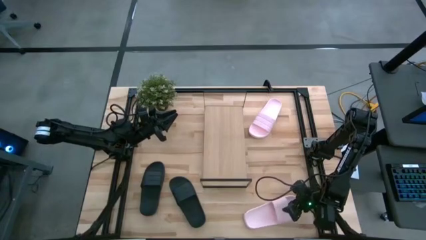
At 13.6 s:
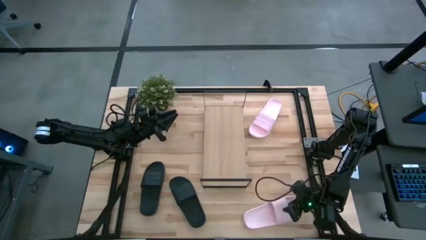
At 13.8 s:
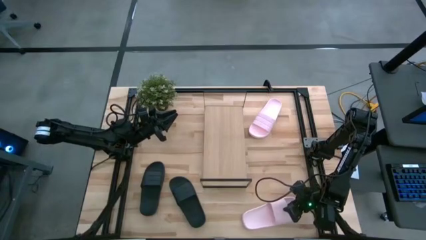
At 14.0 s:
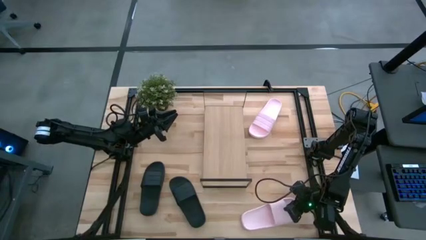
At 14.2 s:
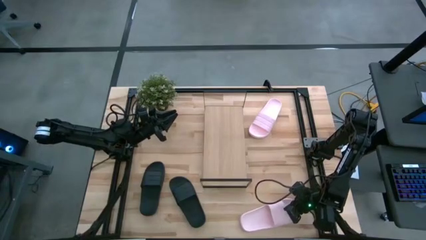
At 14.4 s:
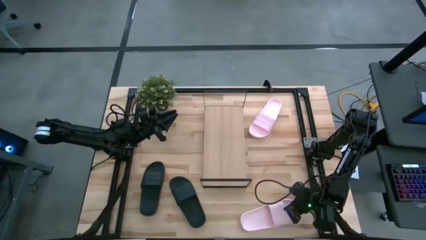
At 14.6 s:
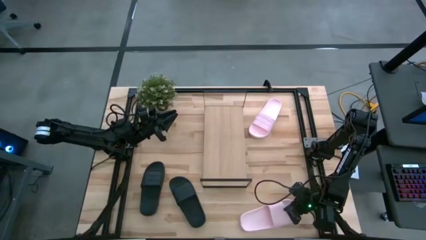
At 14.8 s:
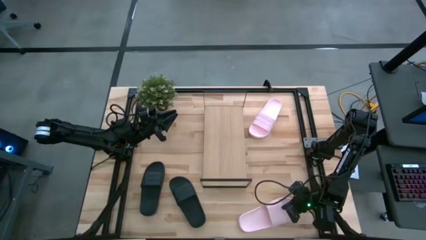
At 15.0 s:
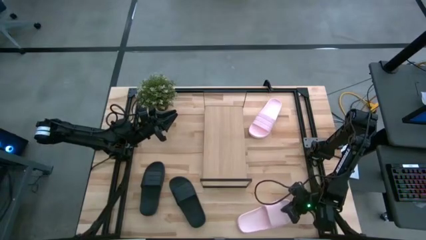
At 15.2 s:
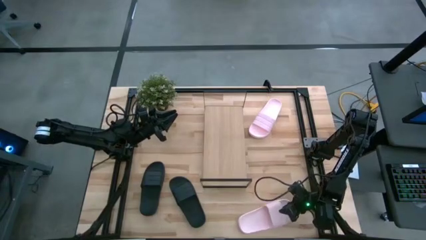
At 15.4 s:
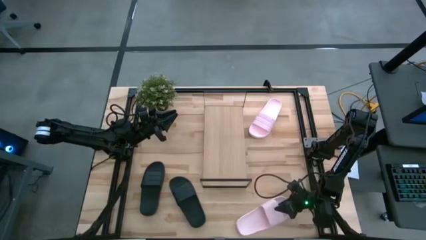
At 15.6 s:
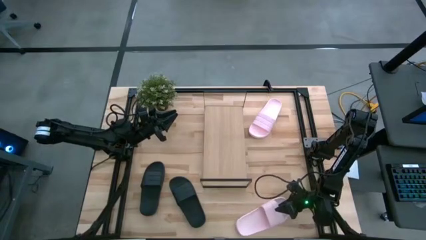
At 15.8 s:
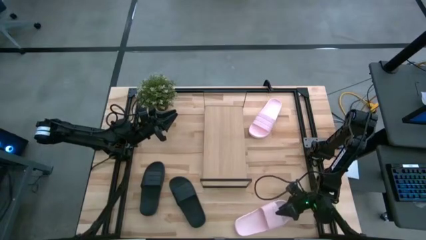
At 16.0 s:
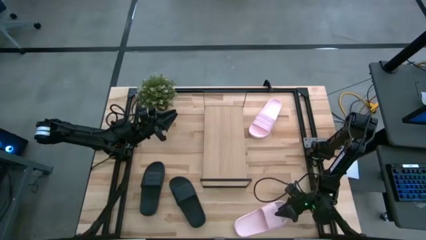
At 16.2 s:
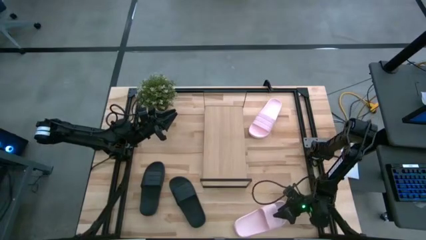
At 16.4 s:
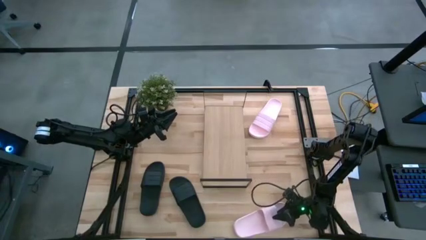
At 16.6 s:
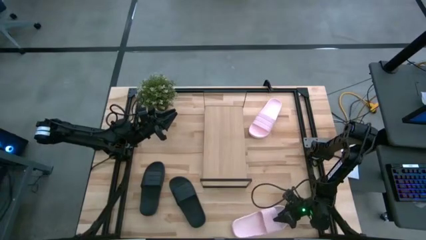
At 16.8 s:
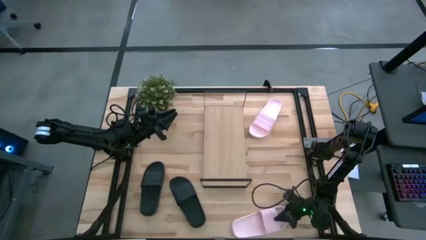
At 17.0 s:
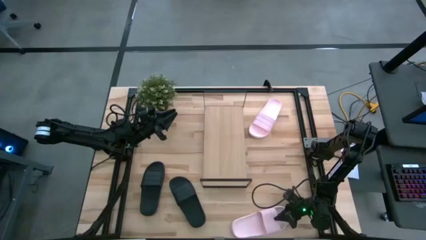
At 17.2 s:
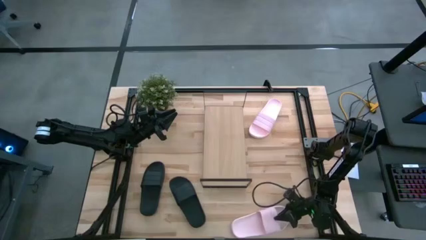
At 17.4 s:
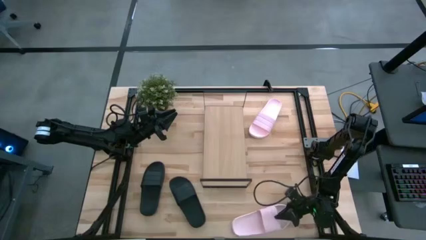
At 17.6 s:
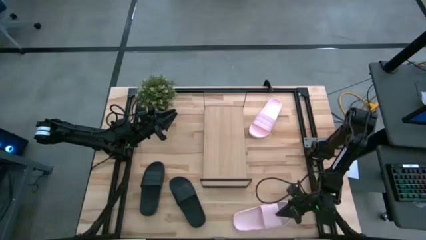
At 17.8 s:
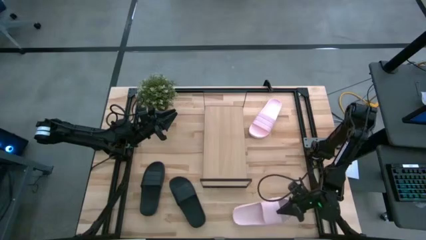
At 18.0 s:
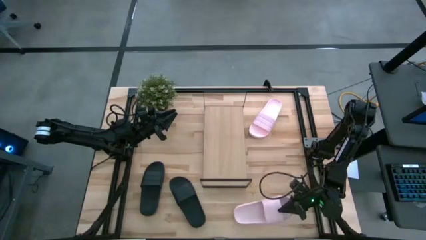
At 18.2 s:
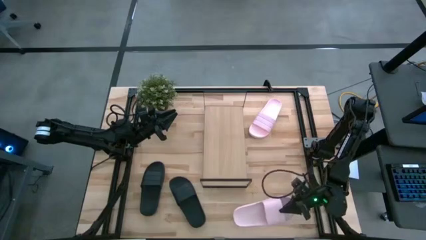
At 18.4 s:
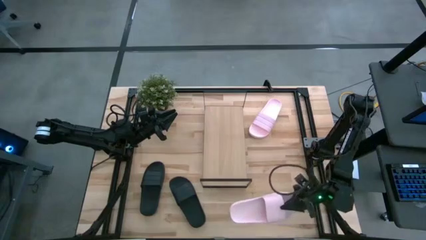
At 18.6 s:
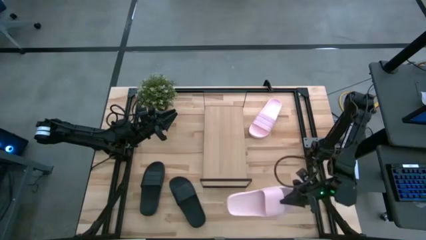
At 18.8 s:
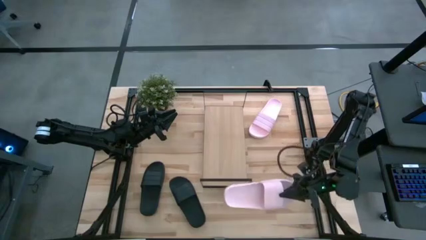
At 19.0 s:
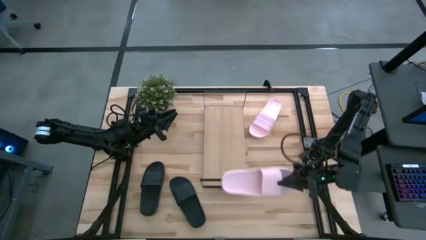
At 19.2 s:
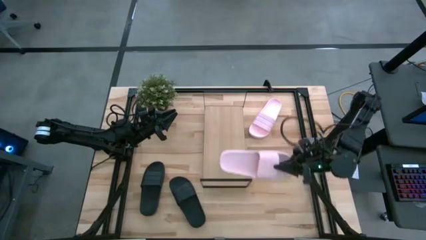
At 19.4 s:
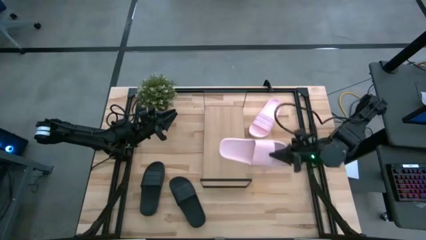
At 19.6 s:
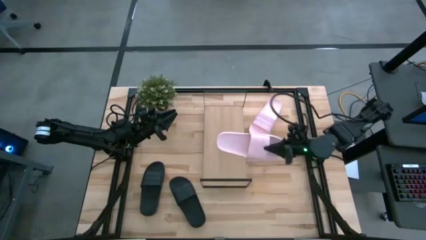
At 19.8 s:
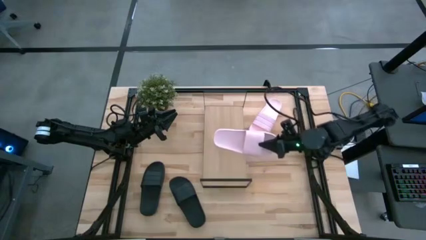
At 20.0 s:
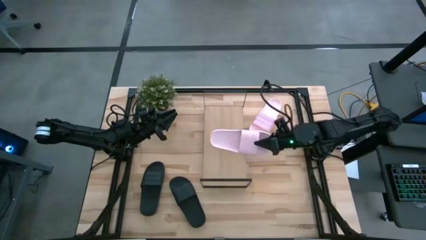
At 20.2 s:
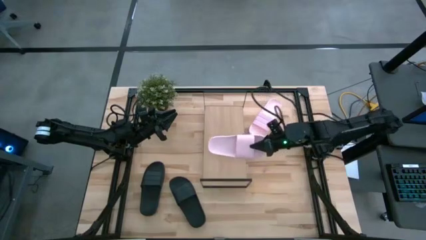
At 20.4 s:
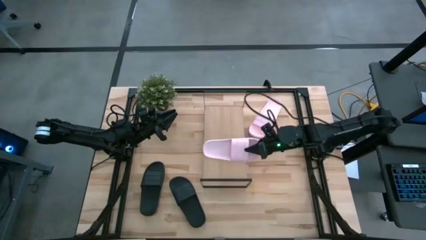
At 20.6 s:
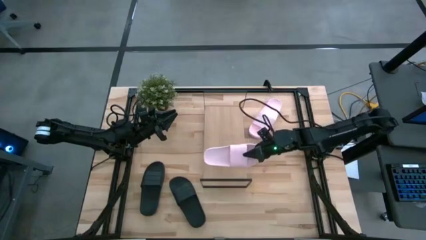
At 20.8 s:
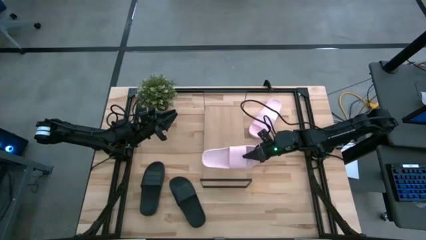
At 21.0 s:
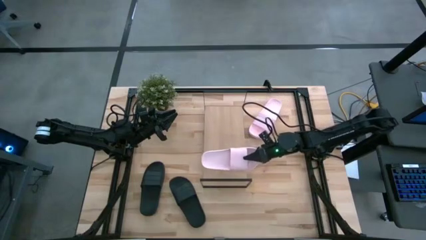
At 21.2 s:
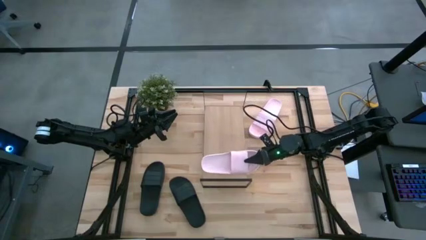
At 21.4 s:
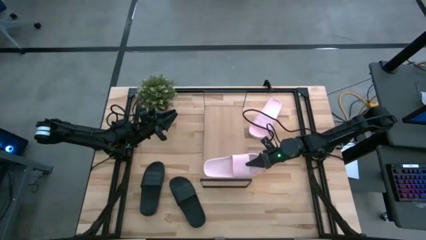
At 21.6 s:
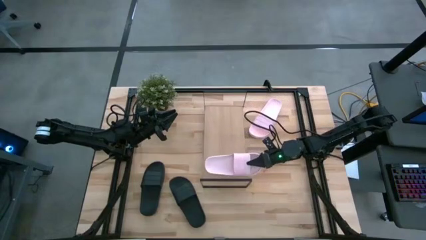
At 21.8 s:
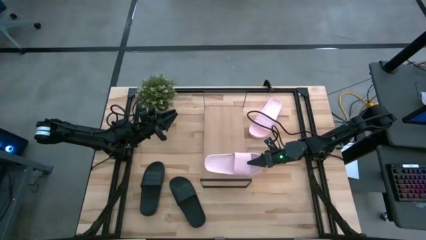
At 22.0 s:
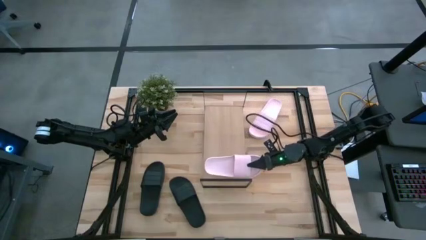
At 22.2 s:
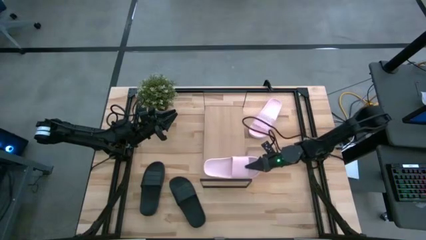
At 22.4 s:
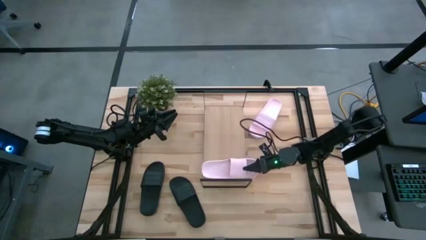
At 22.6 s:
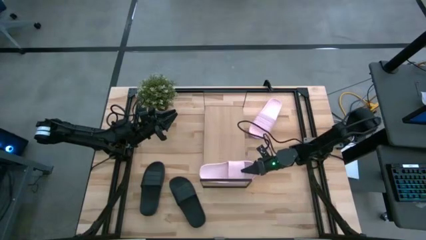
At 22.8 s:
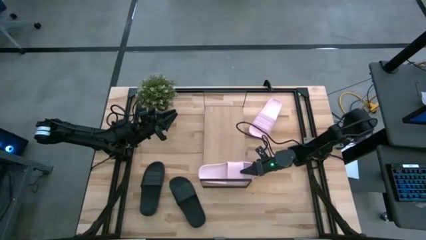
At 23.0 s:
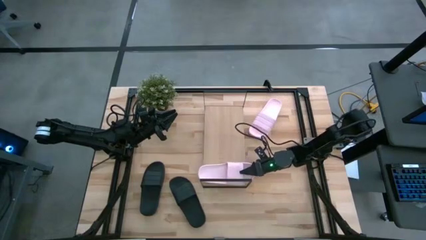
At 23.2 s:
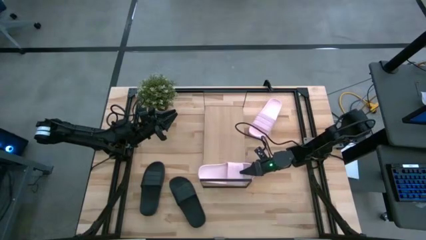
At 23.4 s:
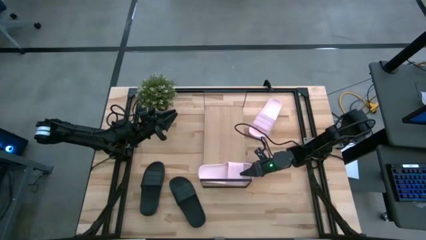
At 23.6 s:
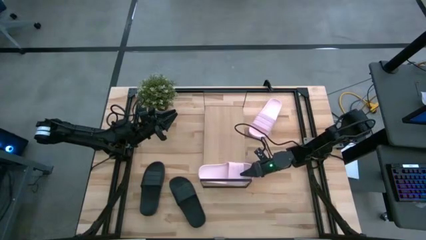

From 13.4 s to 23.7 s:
Task: Pick and place slides into the shelf
Put the bottom pink slide on the shelf
